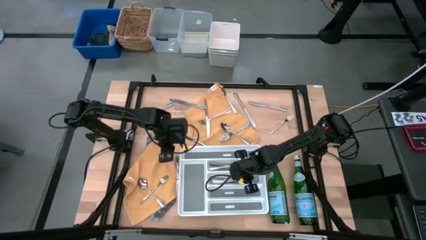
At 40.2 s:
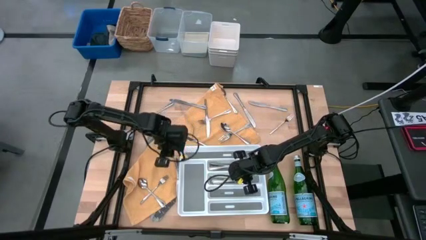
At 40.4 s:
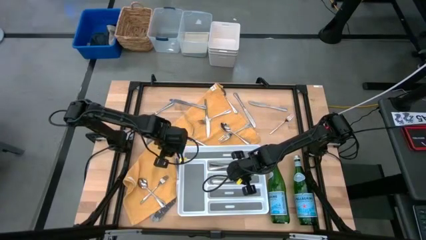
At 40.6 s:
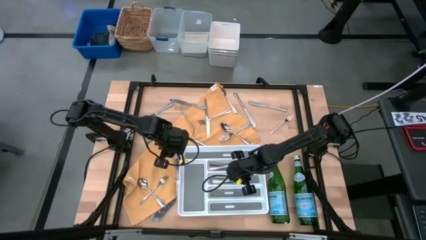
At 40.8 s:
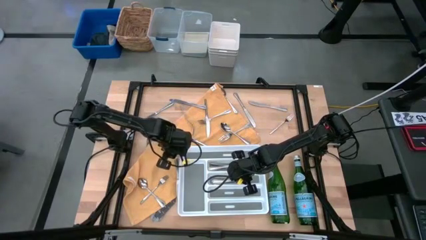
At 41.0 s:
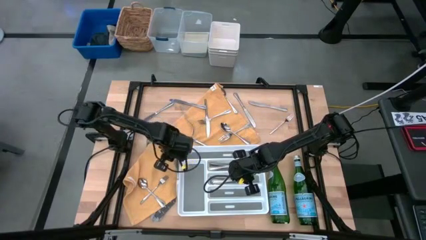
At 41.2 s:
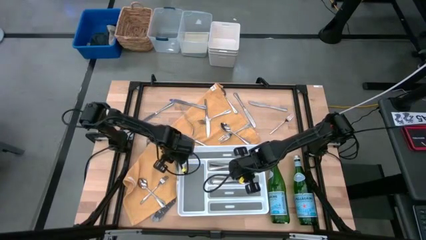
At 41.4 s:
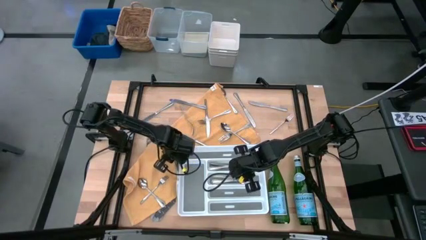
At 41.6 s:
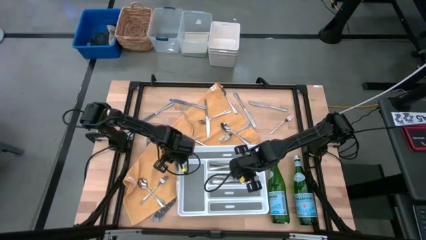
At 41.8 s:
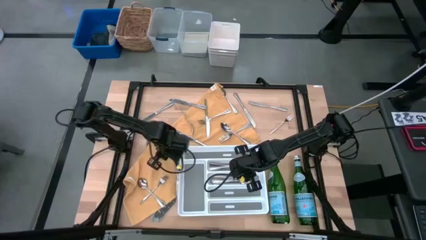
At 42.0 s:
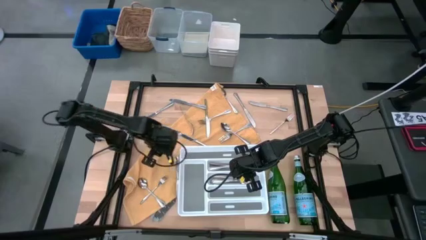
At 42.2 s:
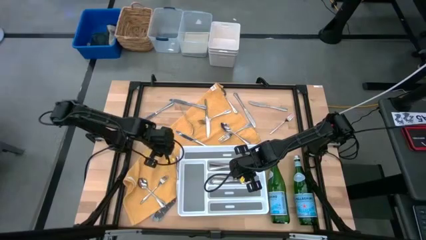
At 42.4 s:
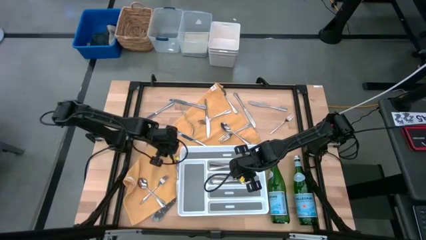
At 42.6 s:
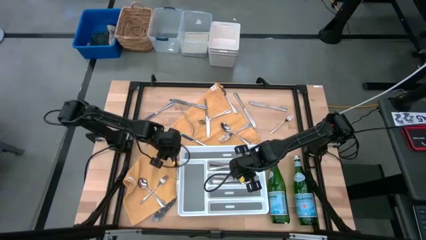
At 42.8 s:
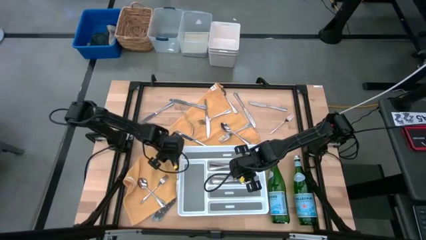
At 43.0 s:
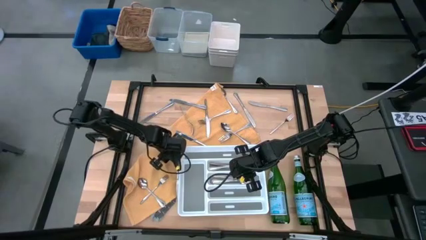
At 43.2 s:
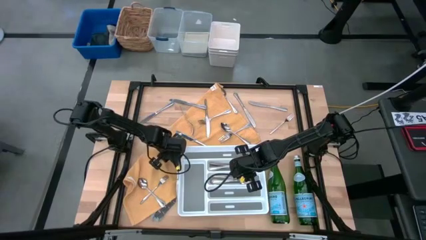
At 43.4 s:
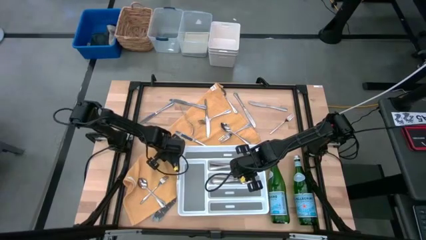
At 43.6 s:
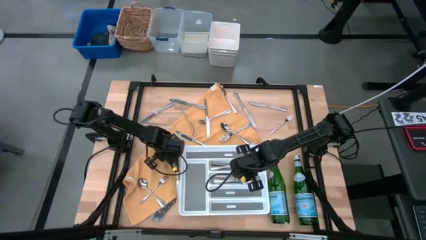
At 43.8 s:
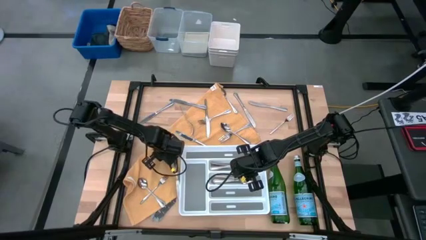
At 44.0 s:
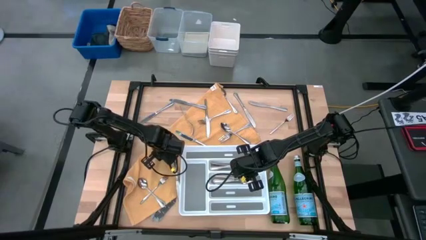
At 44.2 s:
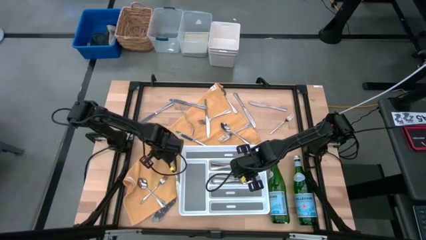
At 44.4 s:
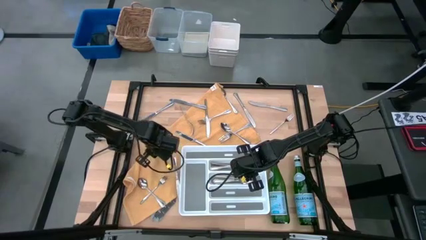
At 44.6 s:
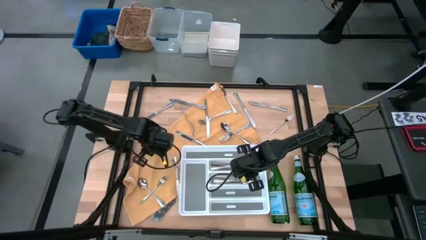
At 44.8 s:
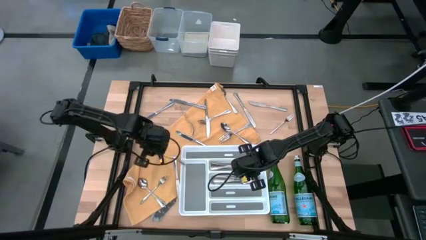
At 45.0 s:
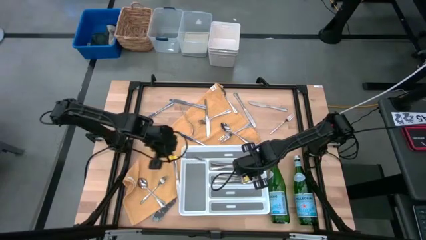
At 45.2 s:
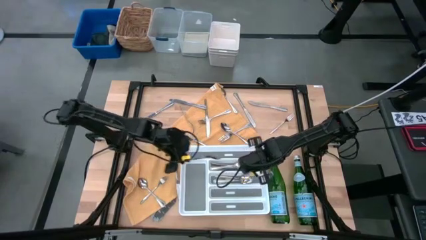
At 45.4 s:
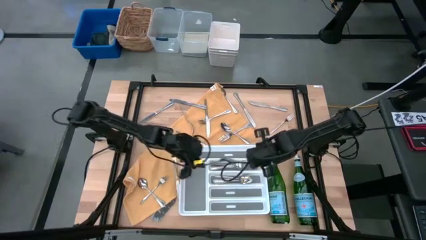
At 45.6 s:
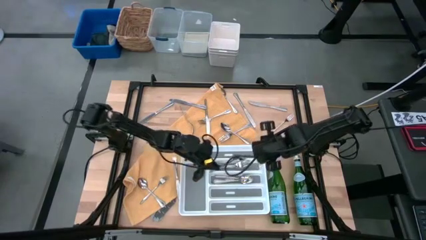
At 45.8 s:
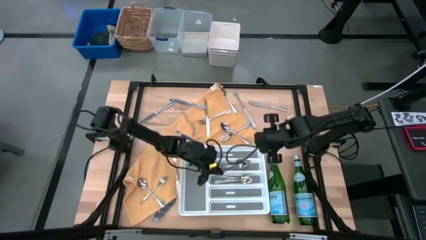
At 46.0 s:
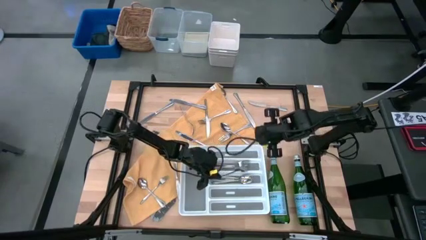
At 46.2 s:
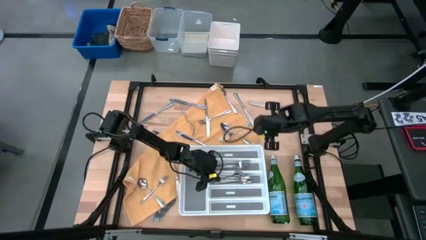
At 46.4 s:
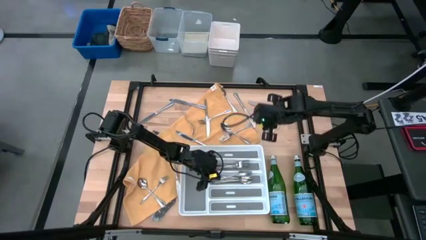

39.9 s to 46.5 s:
Task: Sort silverware
Put the silver spoon into the white silverware tray

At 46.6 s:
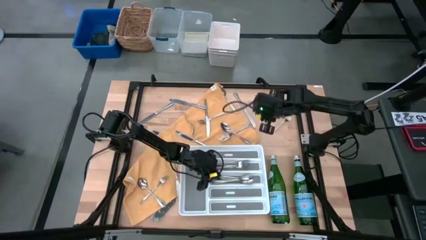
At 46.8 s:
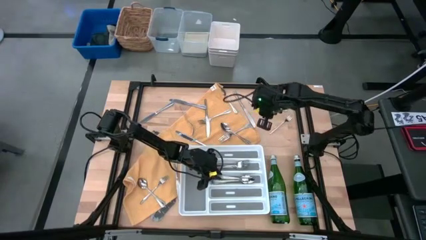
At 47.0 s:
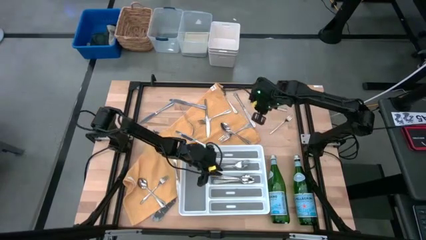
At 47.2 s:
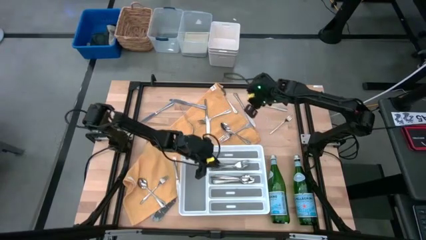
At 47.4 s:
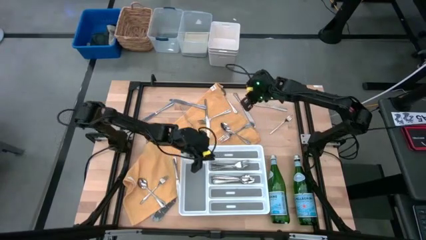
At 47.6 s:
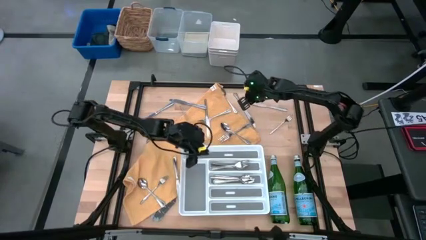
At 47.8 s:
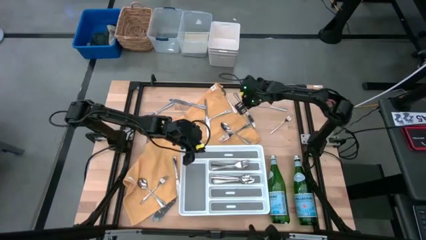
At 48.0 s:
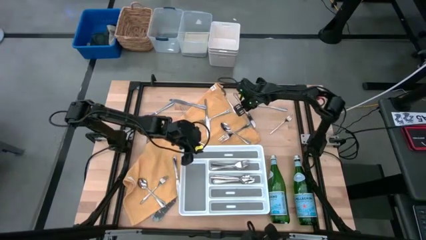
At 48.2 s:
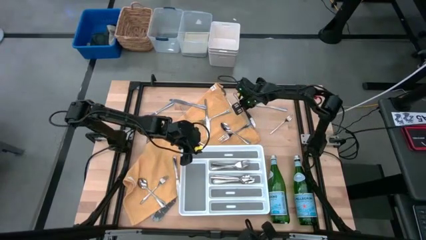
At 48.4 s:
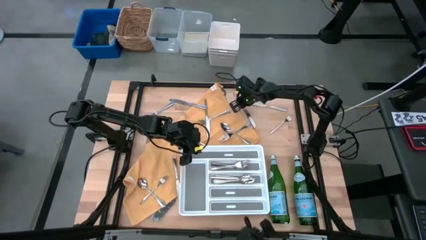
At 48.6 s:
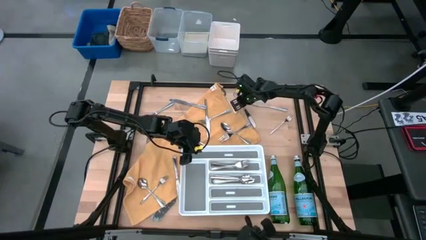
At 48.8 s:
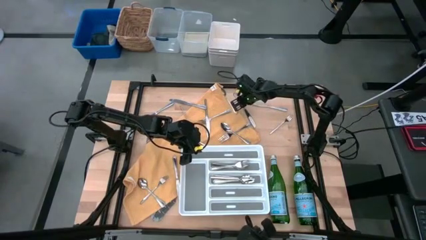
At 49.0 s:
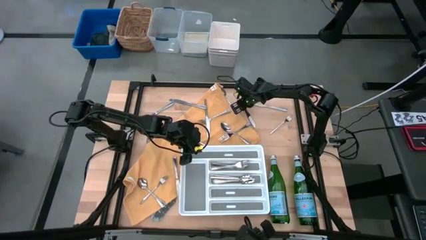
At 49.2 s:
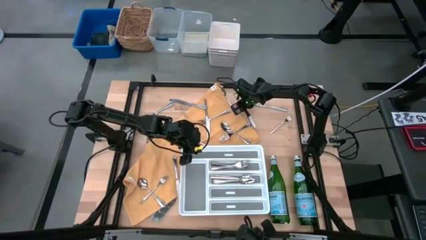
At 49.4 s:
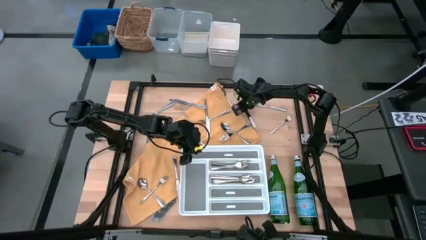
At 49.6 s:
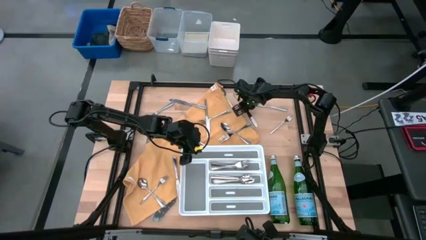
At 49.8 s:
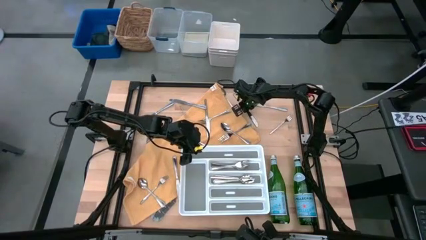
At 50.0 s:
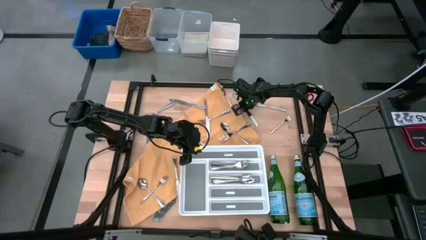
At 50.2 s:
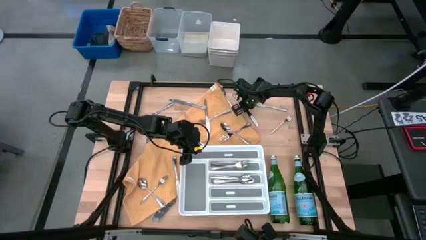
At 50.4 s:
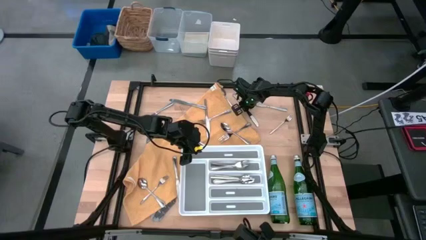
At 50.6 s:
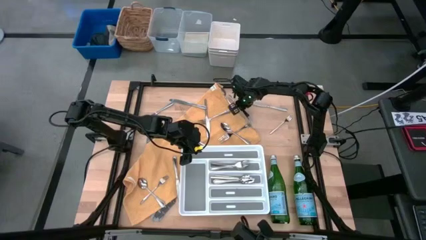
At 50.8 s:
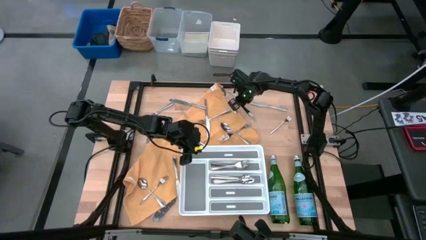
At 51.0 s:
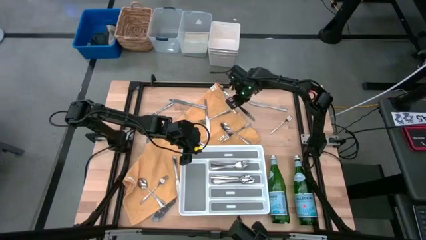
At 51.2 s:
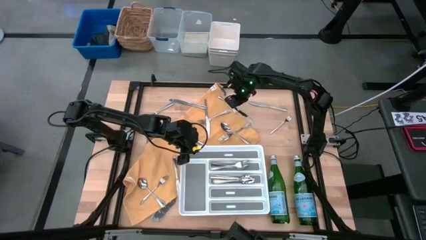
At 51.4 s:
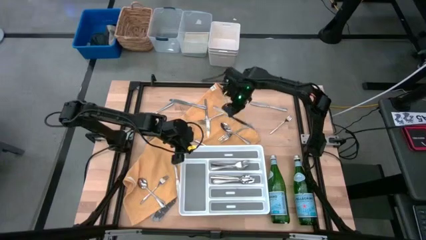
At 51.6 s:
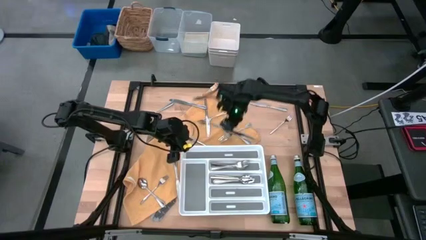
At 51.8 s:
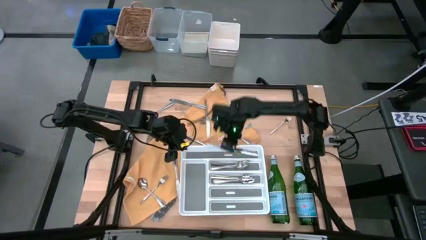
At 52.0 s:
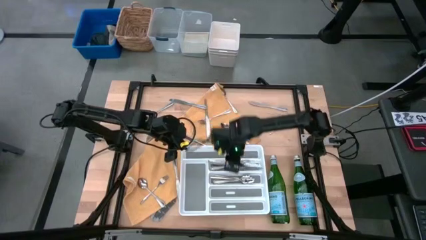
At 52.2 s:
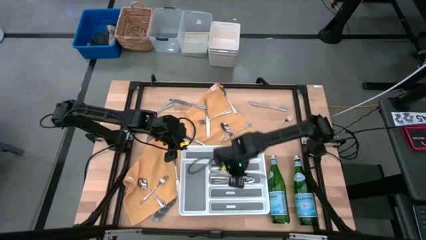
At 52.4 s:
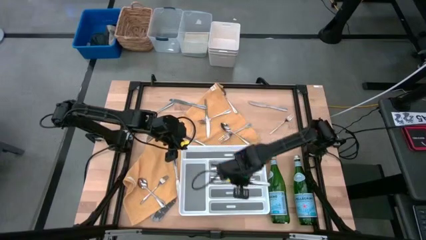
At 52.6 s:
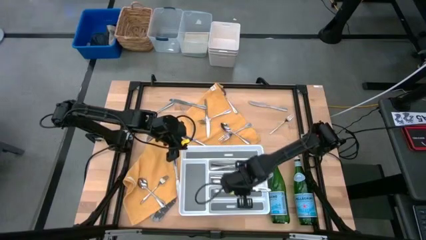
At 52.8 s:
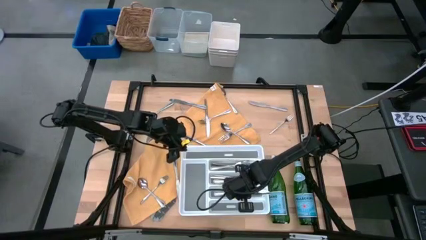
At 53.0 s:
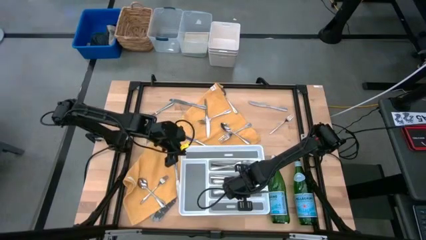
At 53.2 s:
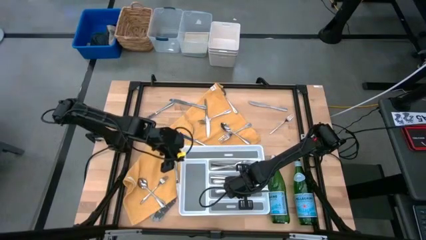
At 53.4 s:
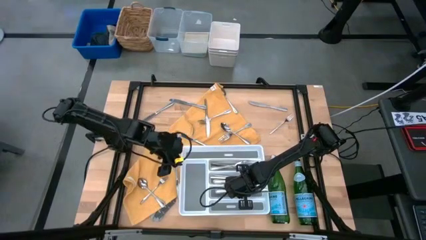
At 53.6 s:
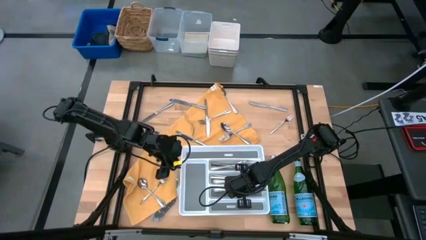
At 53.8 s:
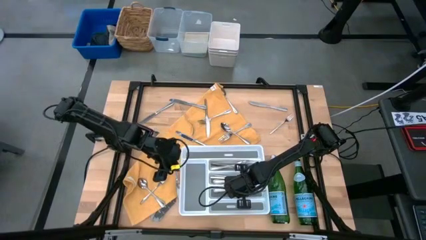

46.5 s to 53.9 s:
Put the silver table knife into the white silverware tray

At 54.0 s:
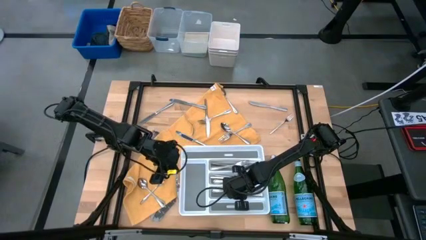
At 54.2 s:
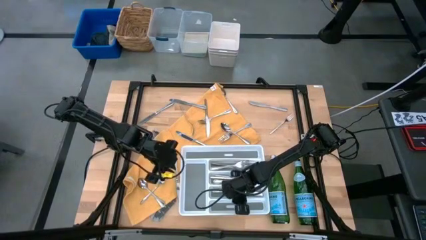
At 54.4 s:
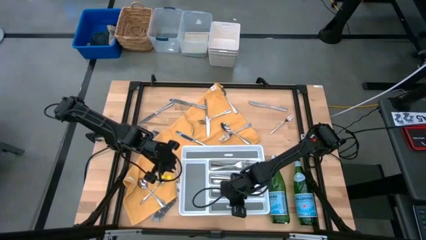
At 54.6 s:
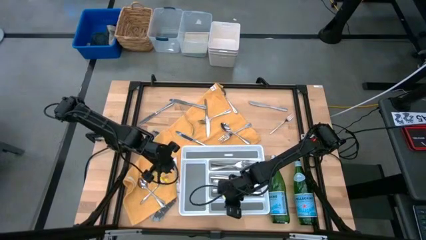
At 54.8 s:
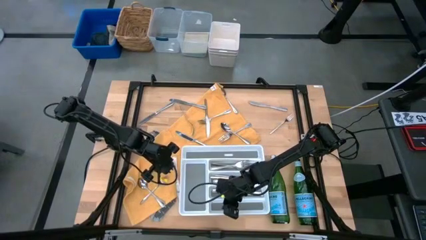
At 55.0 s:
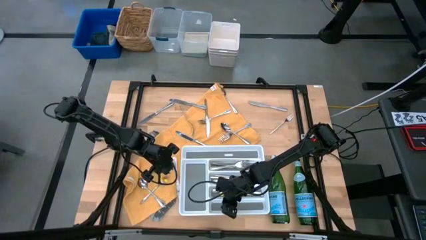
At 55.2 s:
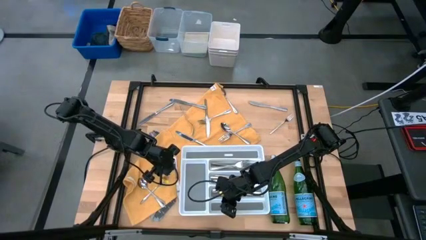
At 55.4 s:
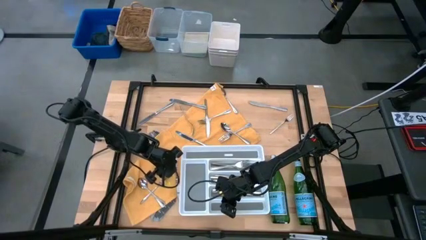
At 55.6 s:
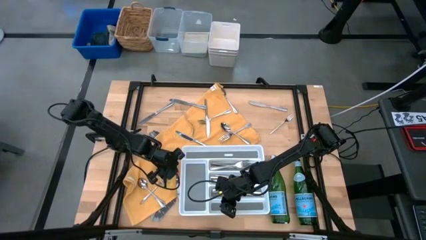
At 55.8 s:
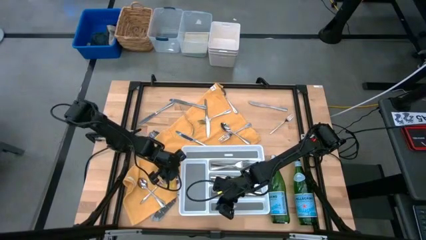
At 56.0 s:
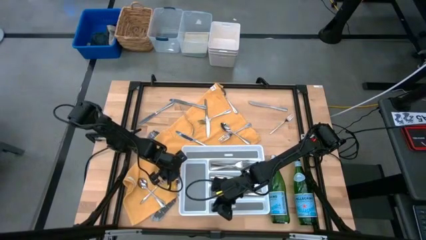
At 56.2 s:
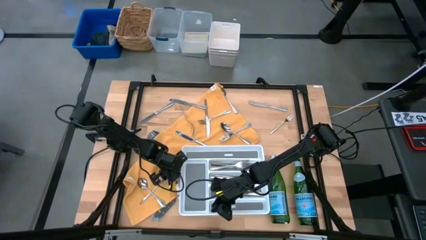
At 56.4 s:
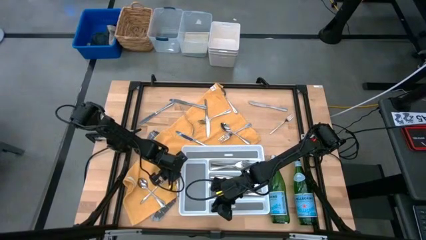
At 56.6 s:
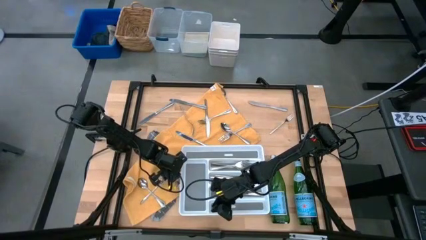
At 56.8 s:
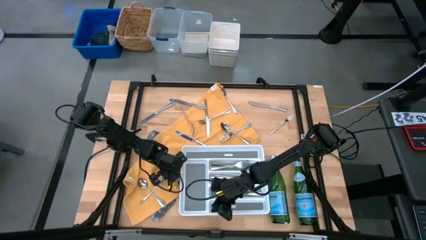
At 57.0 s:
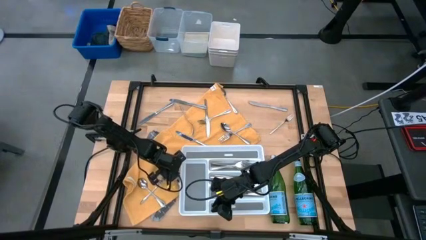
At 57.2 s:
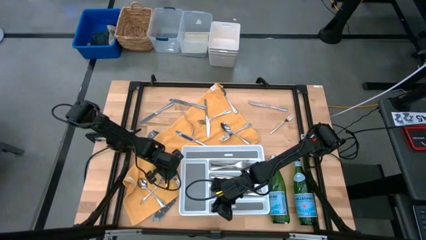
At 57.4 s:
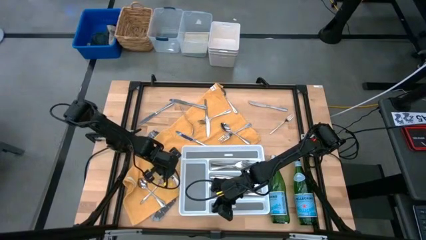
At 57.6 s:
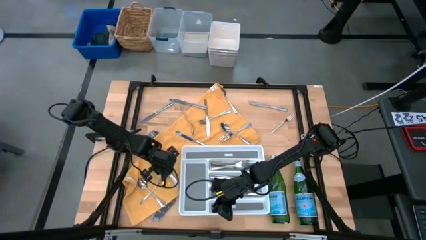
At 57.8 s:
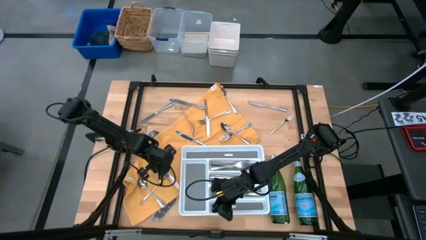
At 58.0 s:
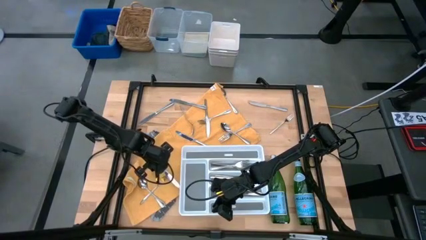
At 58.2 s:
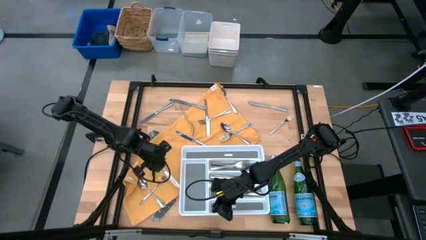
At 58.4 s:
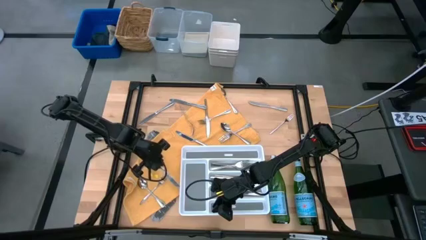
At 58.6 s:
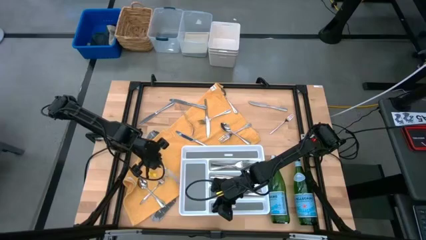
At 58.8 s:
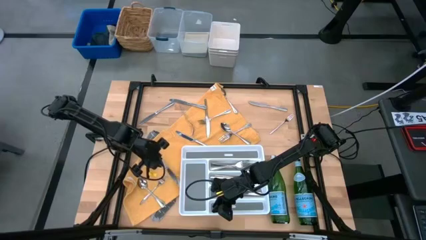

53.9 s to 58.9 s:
Put the silver table knife into the white silverware tray
